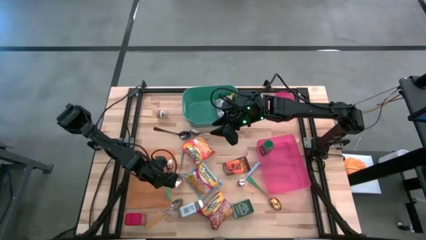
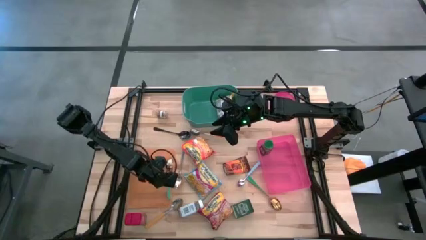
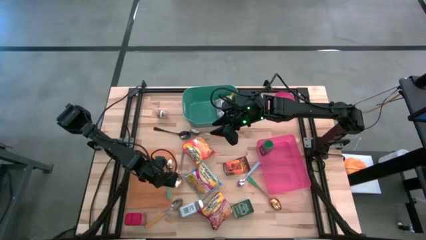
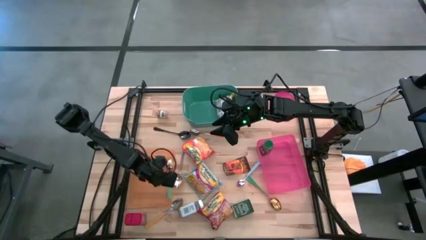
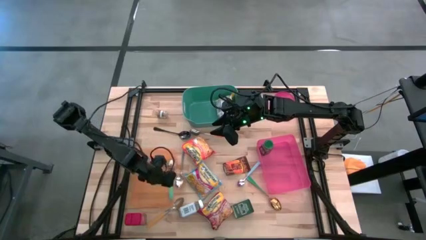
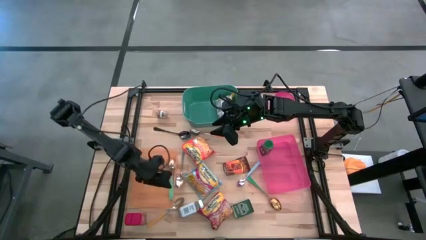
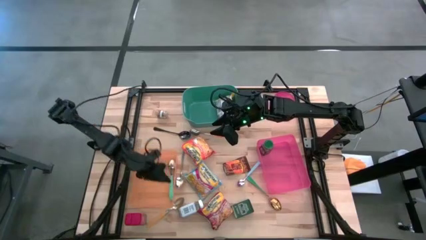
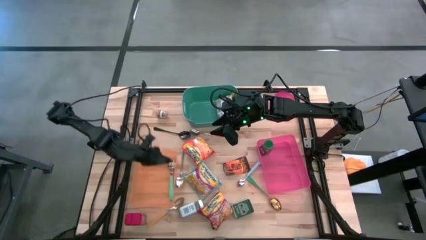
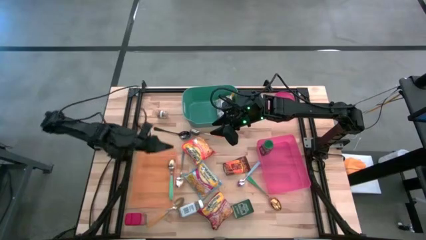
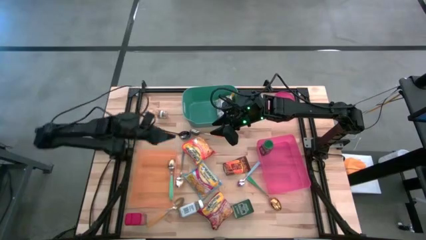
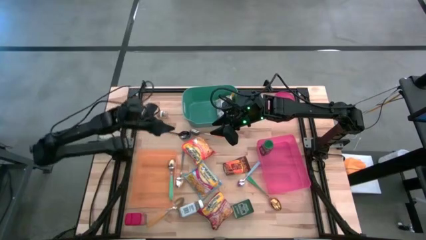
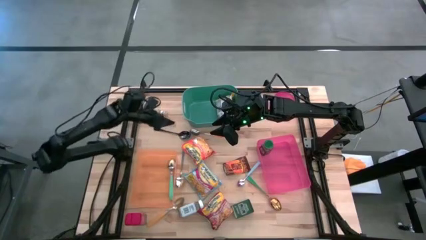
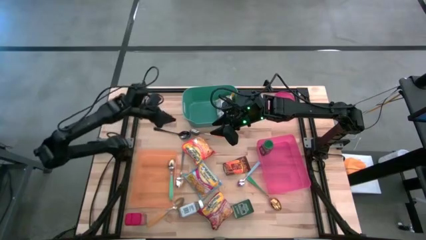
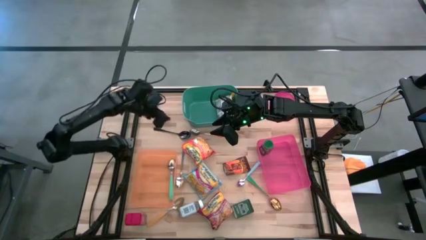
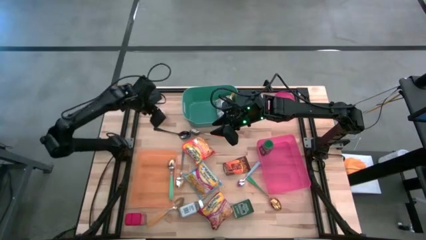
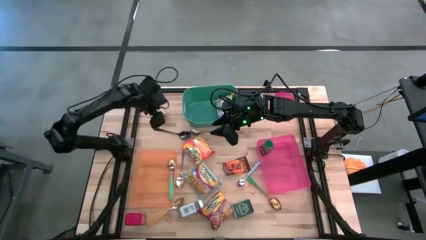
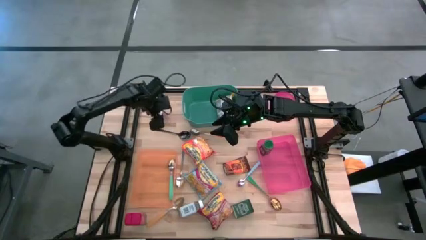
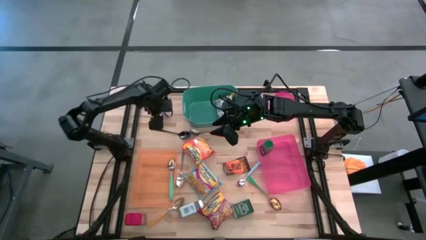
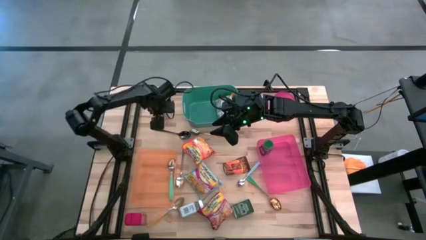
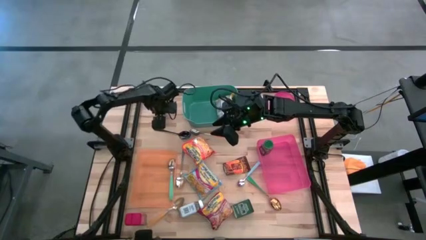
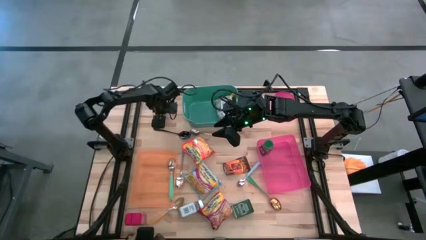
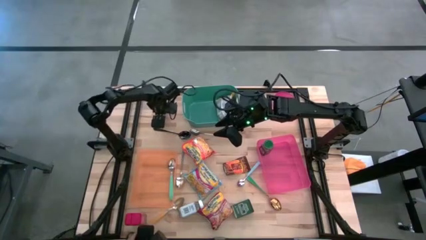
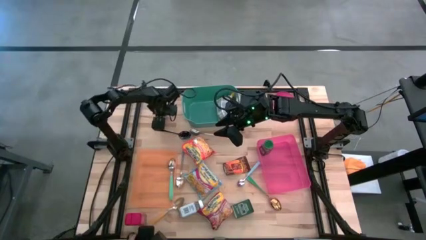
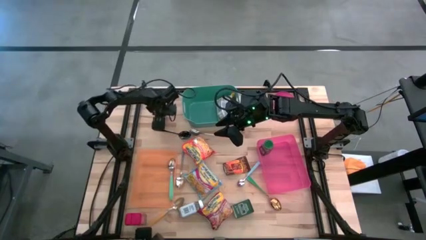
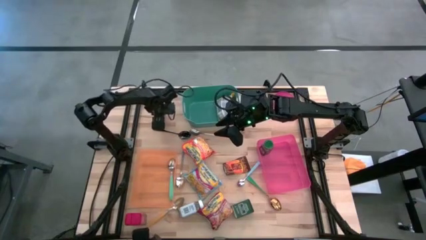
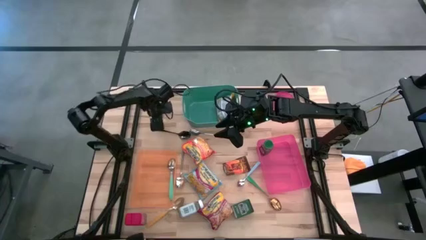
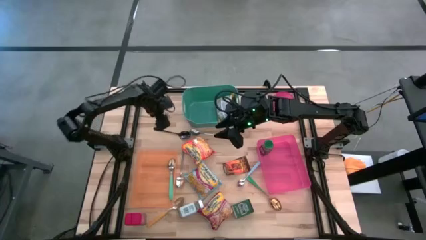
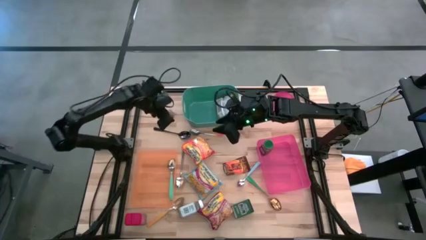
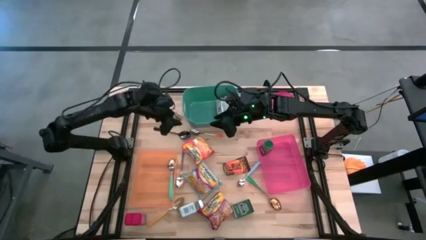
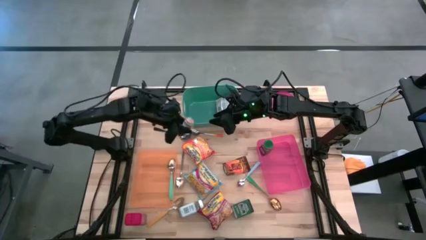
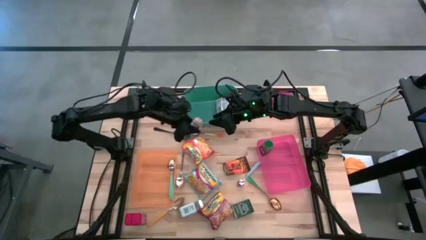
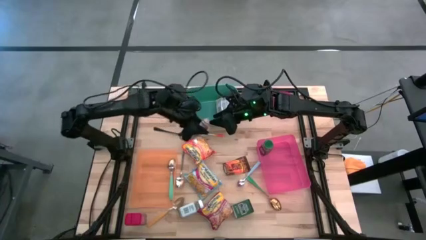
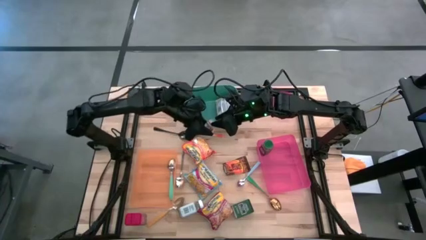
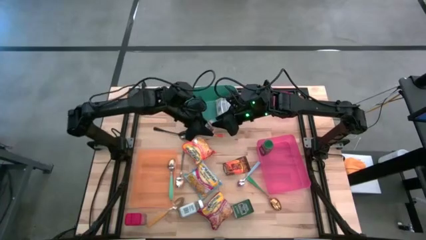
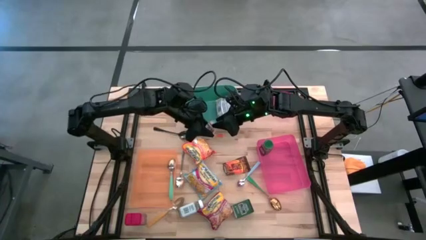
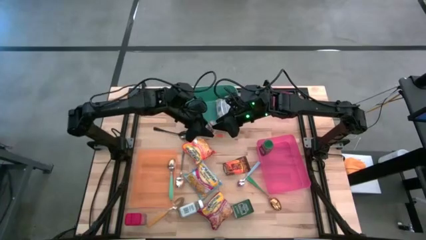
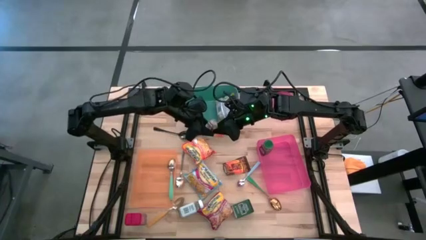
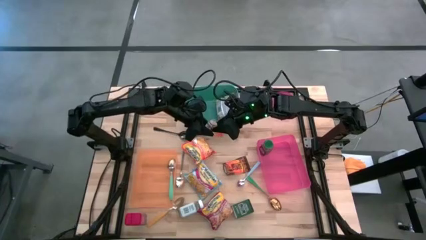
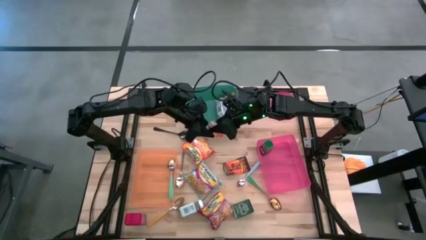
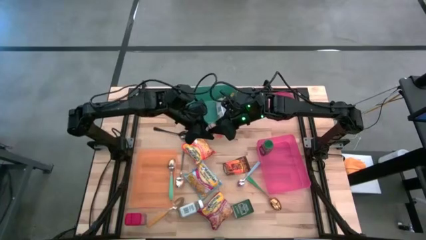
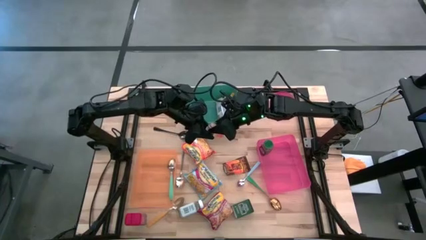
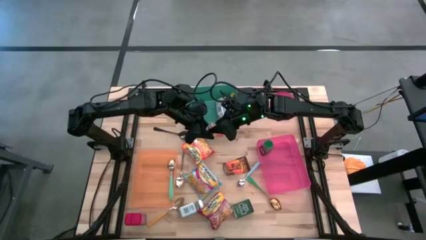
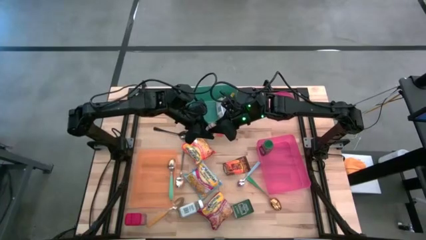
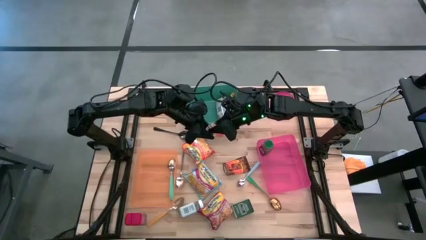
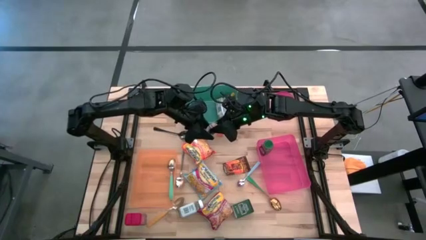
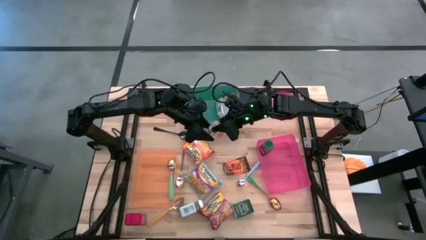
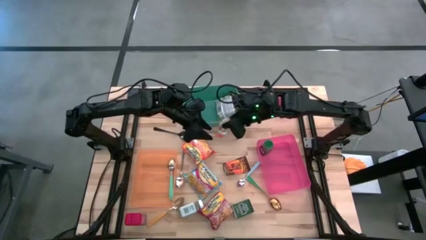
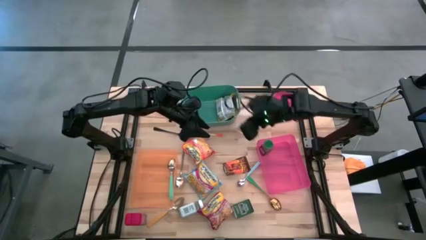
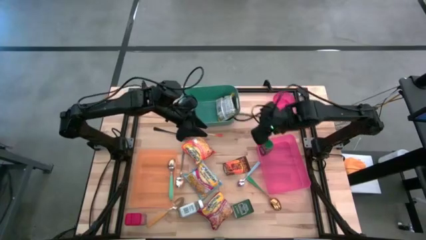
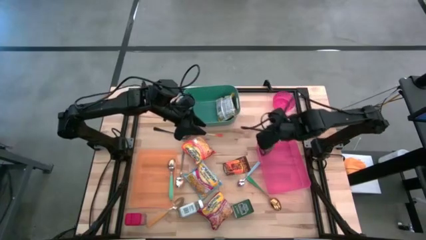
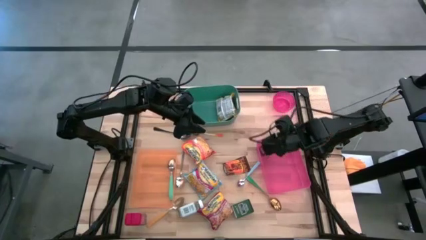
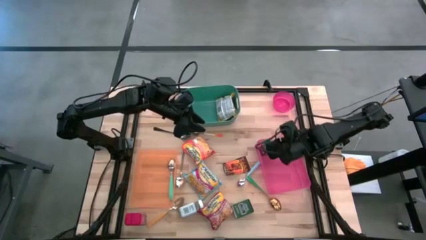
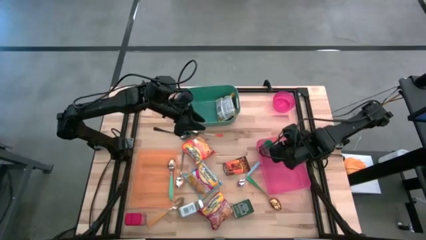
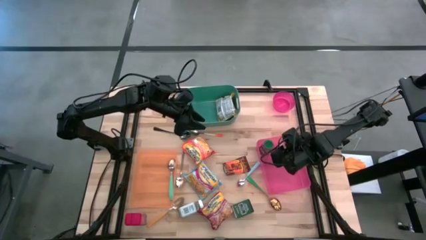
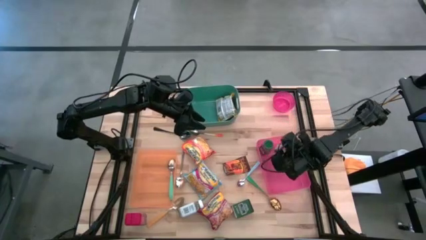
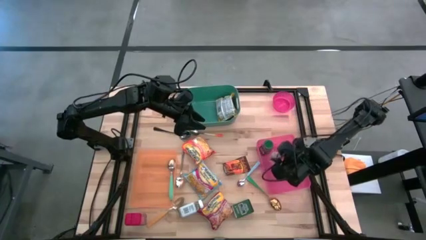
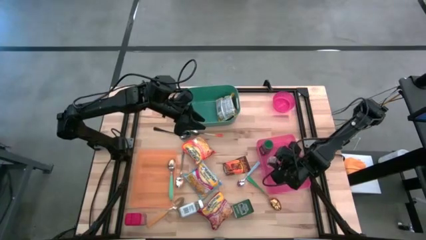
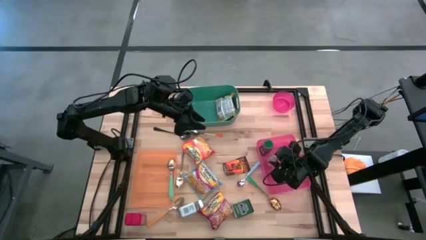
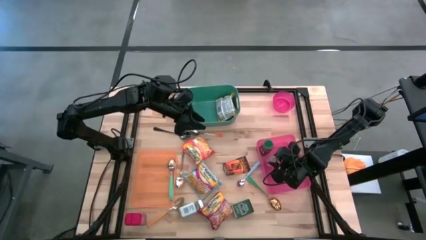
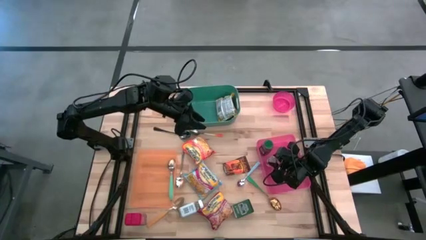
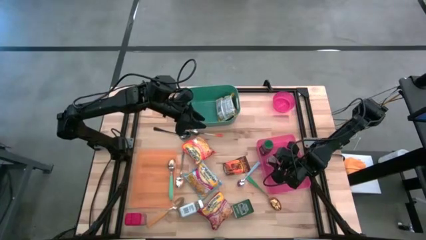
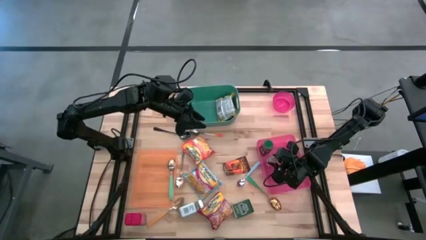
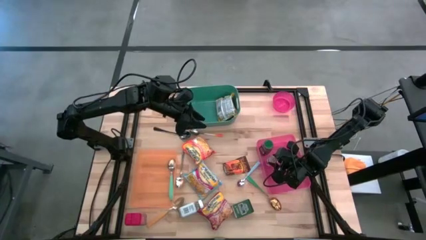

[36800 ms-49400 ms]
Put the transparent spice bottle into the pink bin
